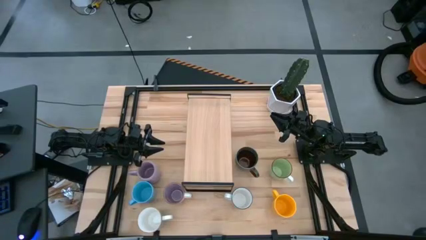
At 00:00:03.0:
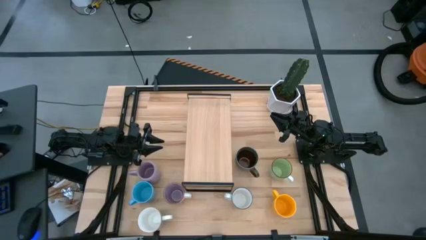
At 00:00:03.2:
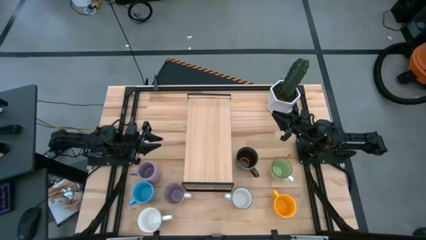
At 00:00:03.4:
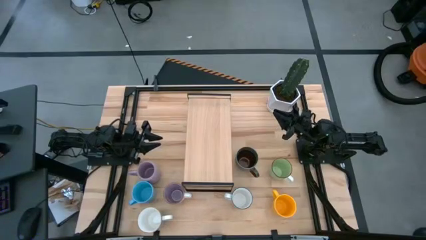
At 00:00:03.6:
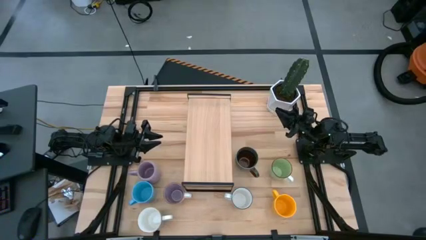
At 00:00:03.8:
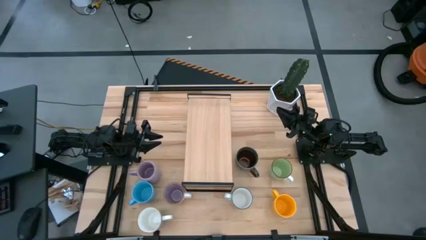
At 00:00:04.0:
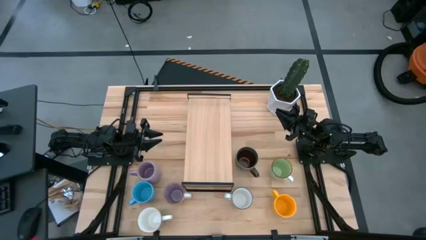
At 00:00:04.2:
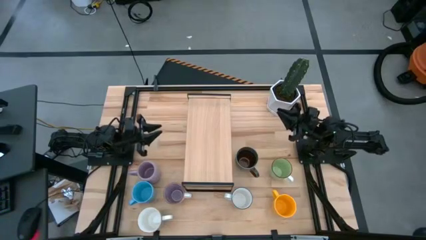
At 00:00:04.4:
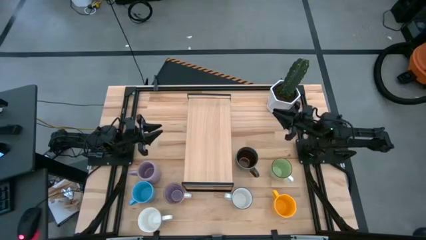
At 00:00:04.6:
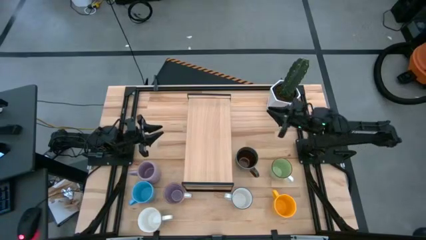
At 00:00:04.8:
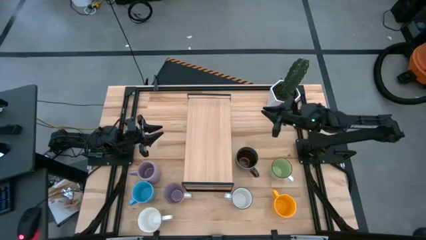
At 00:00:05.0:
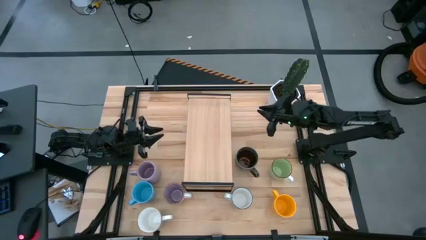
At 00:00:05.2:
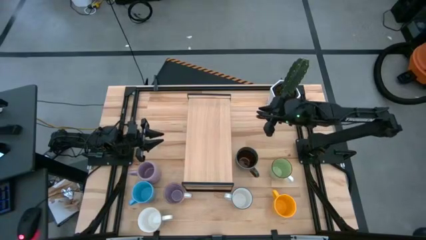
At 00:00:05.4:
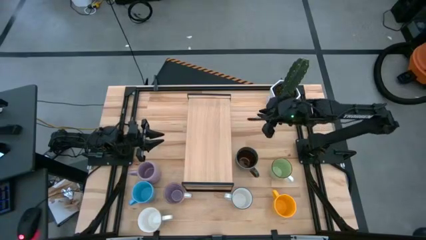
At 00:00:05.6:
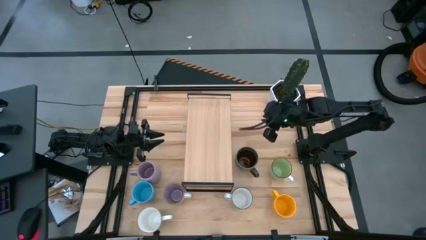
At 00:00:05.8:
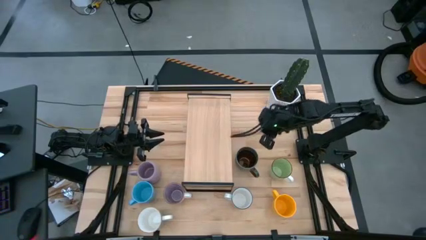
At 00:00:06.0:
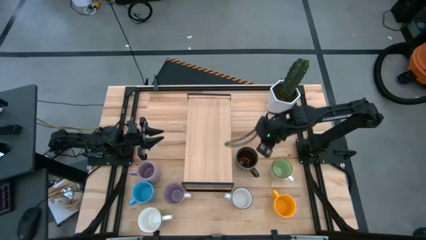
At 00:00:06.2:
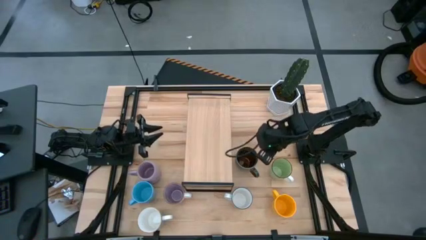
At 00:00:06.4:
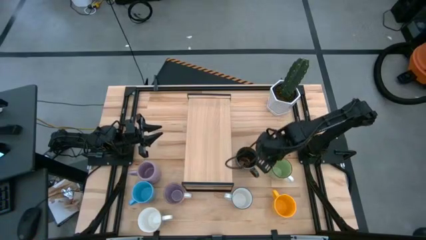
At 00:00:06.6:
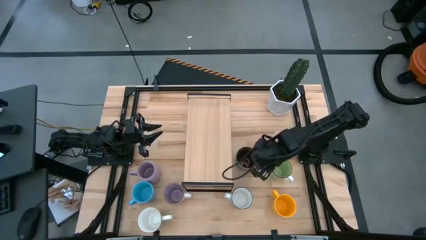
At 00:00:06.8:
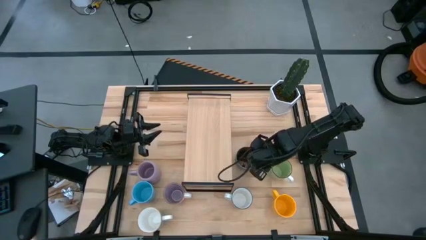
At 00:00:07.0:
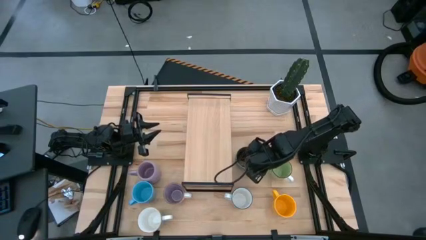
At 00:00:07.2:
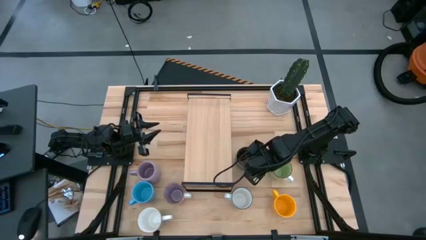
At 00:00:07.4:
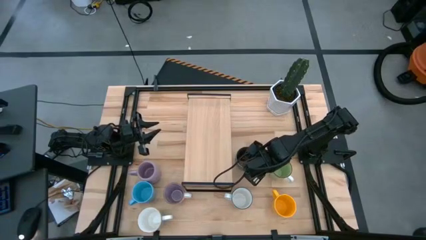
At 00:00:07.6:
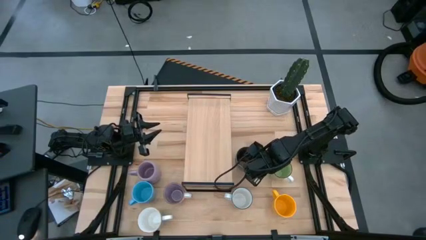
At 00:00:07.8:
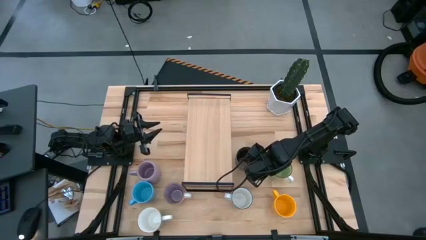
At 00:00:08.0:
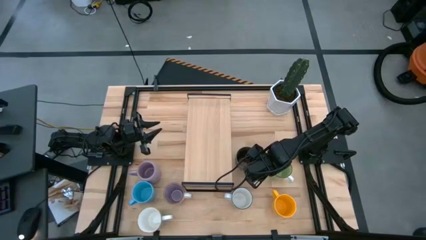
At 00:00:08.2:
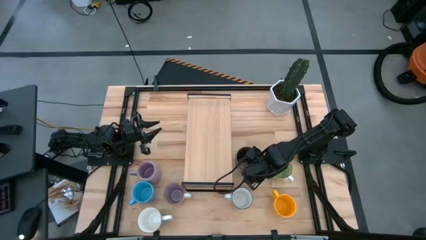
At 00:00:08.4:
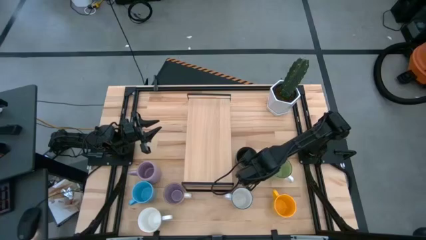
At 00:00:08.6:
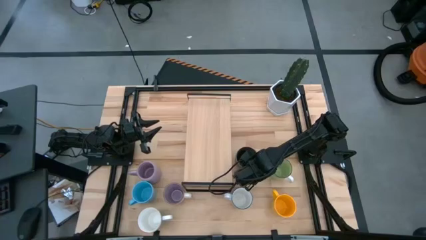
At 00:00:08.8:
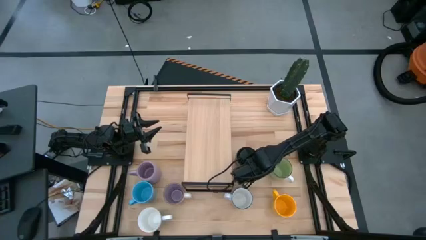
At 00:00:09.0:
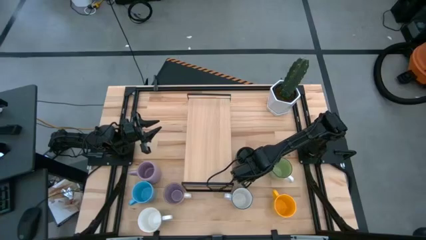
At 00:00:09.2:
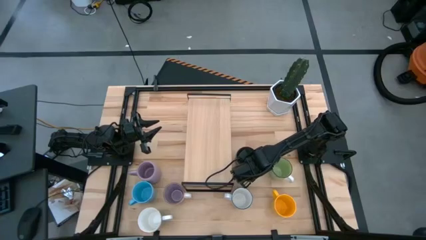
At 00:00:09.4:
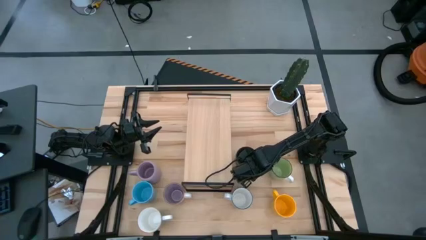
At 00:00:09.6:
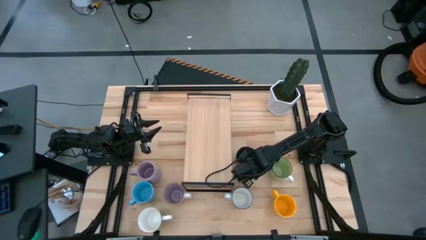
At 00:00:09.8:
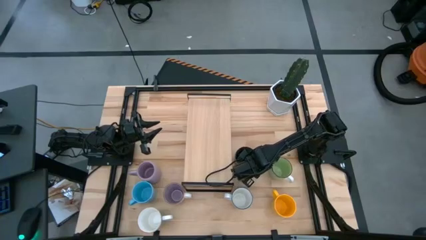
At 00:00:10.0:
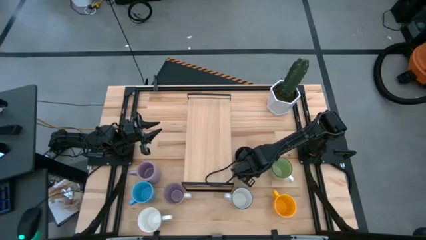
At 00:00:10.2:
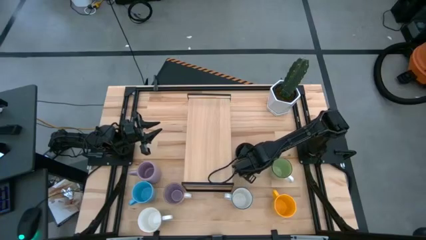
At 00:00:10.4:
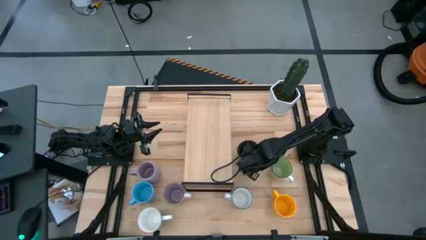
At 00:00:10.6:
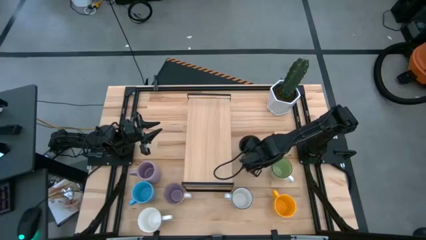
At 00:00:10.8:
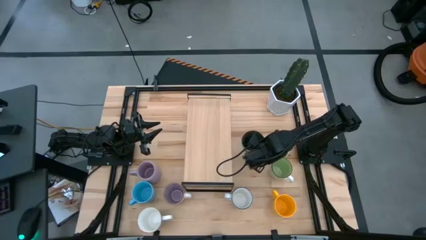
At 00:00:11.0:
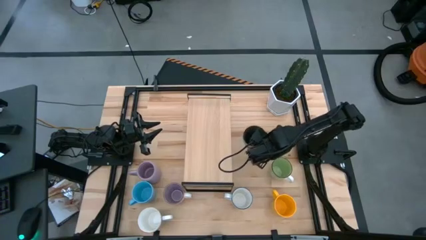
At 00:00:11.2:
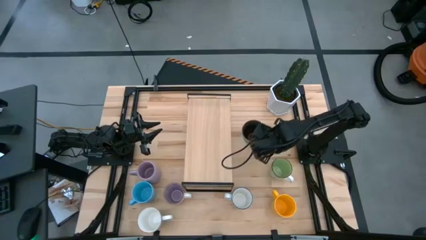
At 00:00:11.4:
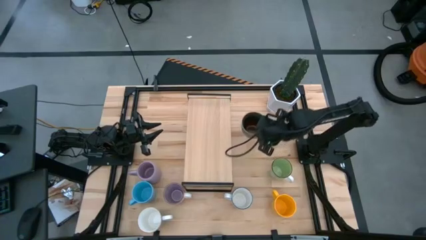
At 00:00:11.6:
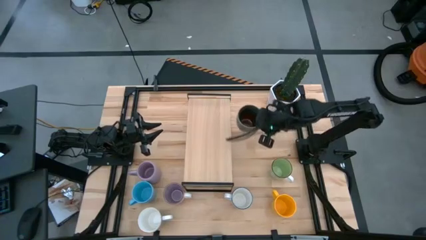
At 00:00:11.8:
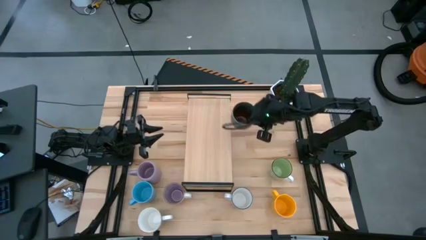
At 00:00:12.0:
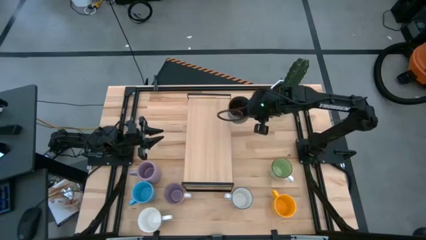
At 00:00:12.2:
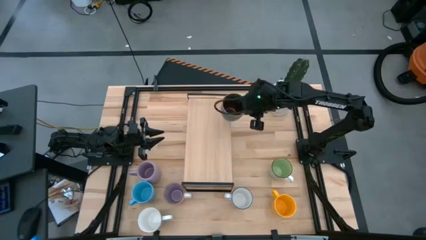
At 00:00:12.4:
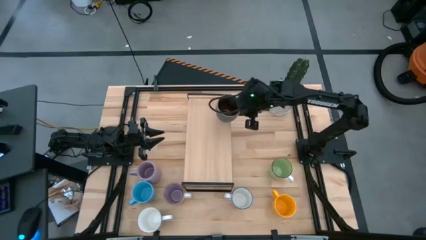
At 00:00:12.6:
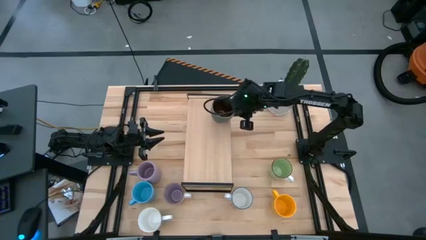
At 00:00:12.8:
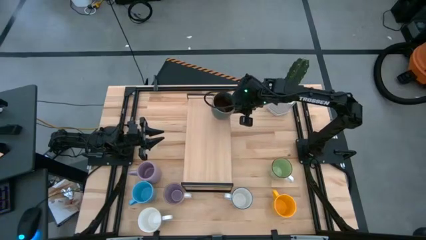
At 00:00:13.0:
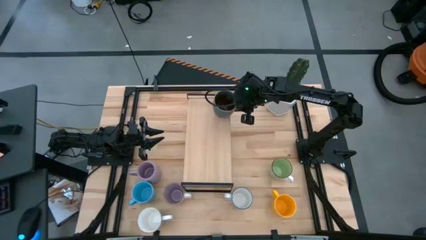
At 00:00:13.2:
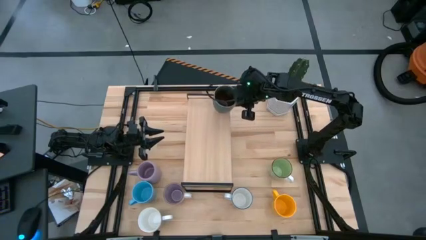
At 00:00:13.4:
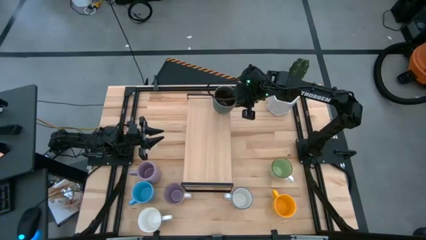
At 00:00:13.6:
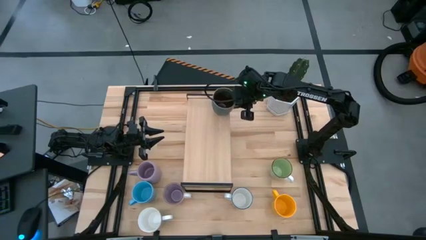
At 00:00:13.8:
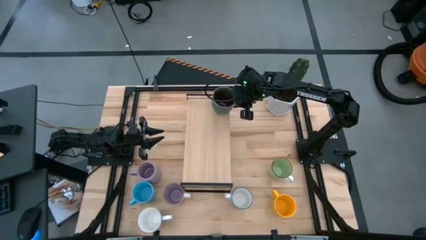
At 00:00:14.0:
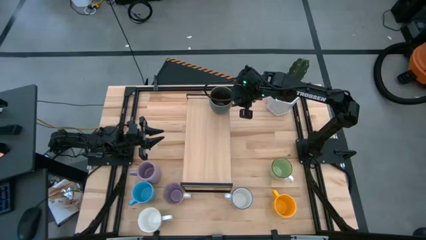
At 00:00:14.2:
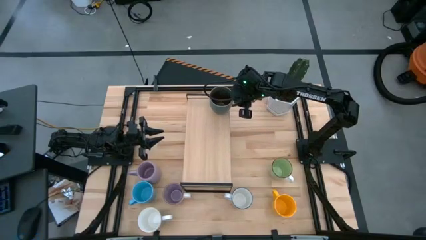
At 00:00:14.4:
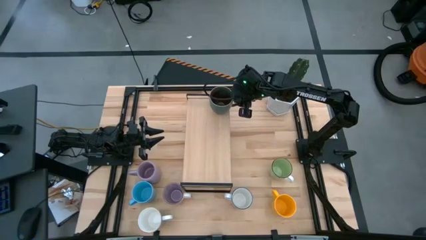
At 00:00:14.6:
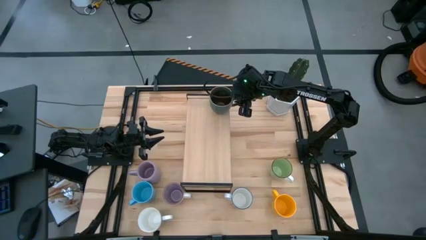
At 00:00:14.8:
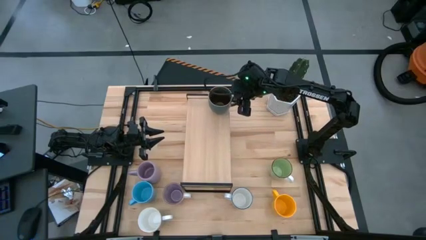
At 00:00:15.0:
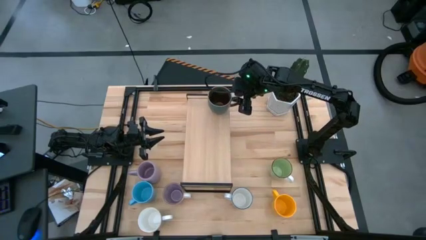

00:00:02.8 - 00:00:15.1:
Task: Place coffee mugs
Put the dark blue mug on the shelf
